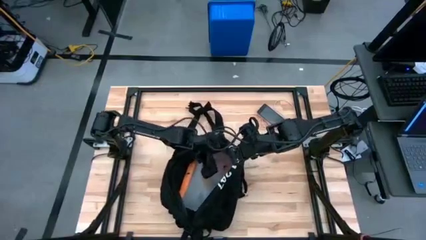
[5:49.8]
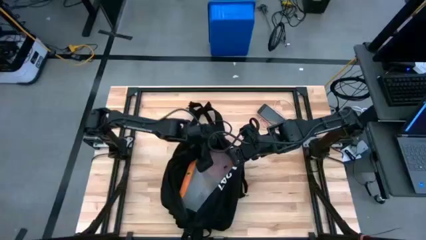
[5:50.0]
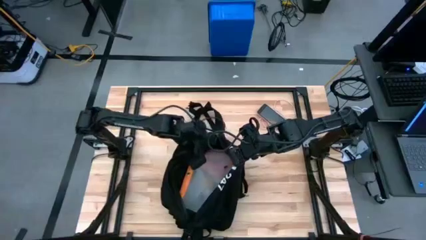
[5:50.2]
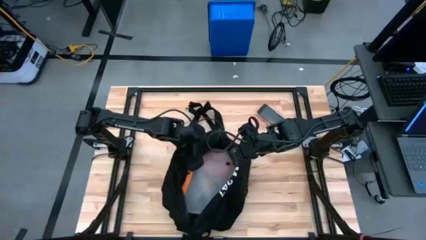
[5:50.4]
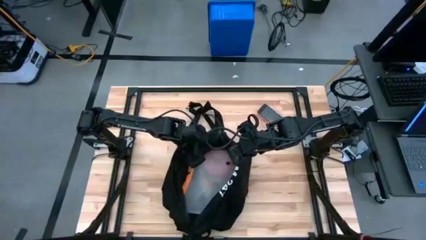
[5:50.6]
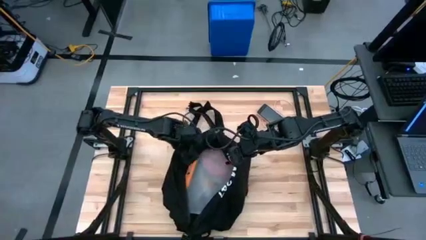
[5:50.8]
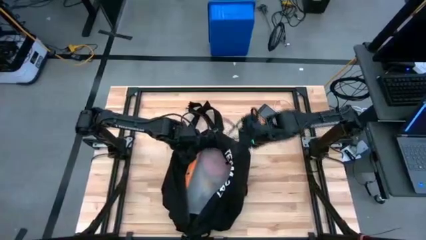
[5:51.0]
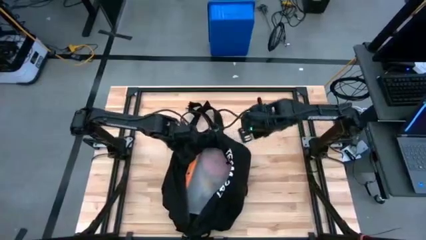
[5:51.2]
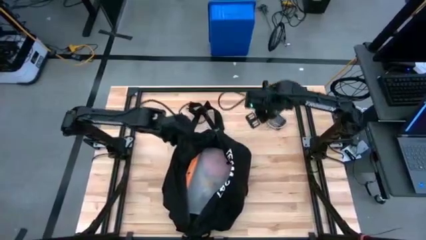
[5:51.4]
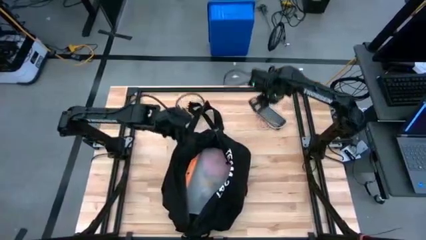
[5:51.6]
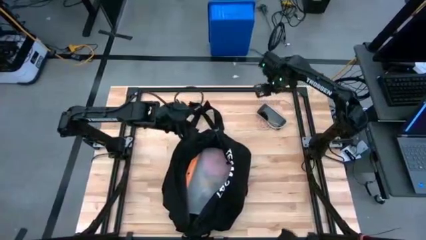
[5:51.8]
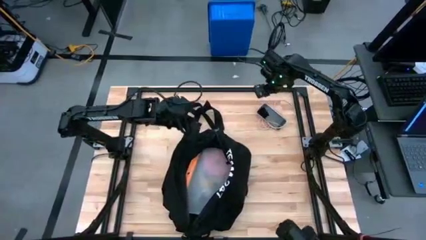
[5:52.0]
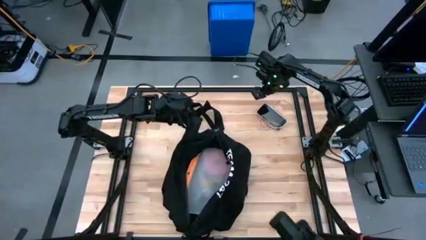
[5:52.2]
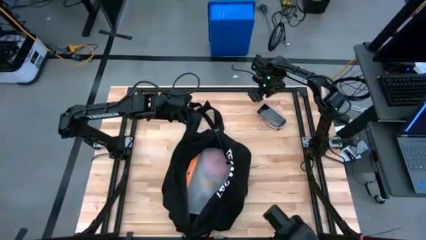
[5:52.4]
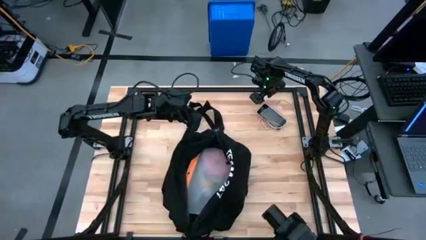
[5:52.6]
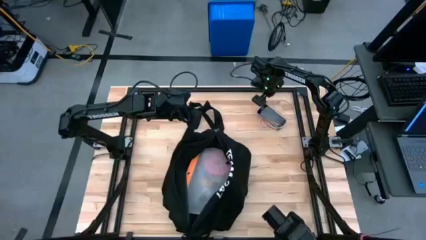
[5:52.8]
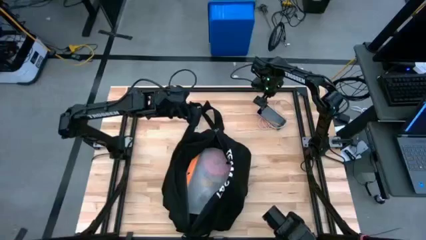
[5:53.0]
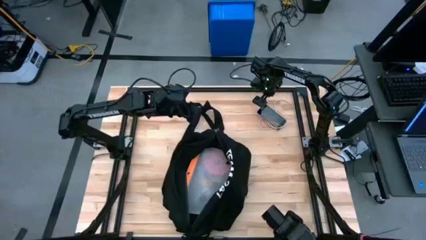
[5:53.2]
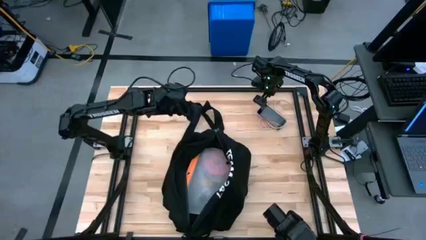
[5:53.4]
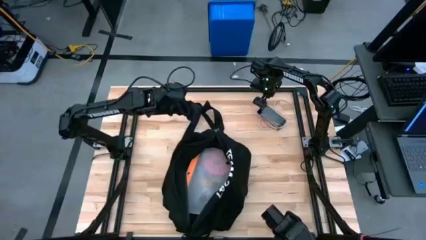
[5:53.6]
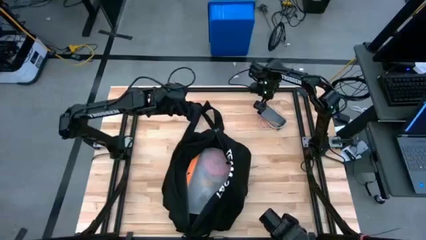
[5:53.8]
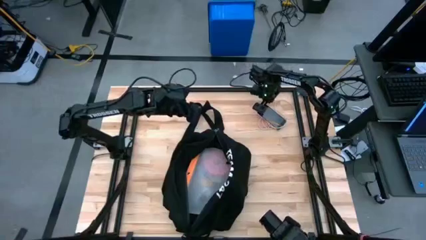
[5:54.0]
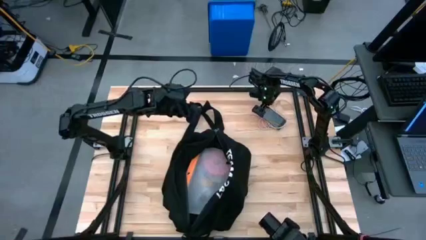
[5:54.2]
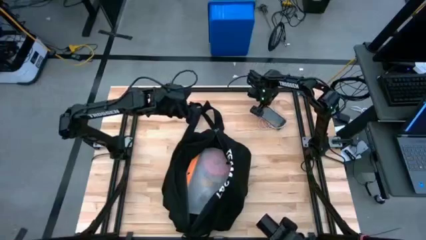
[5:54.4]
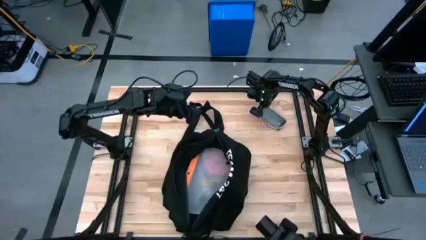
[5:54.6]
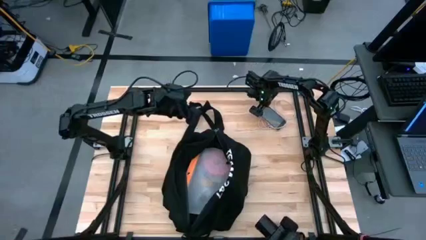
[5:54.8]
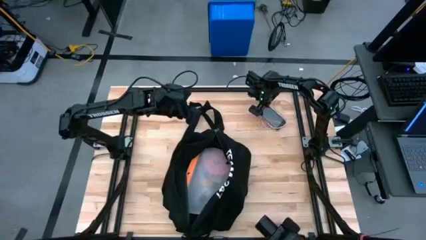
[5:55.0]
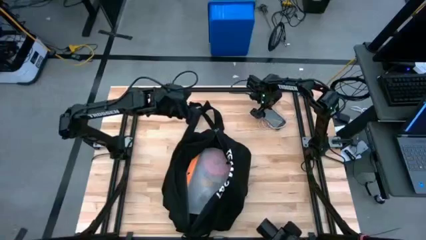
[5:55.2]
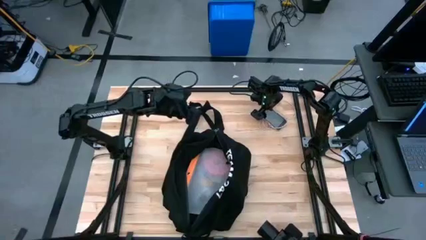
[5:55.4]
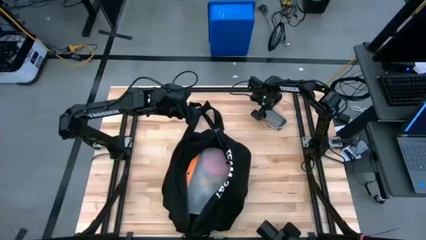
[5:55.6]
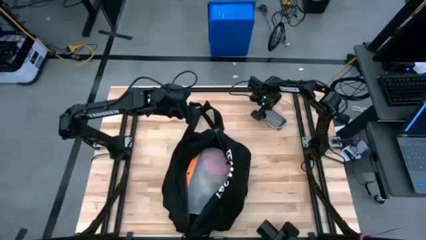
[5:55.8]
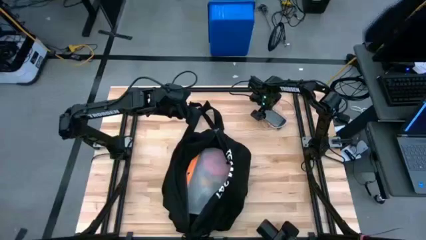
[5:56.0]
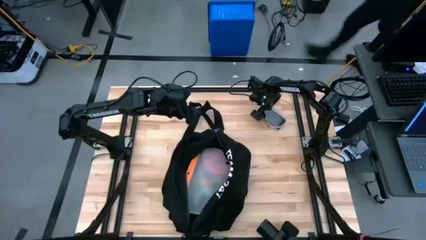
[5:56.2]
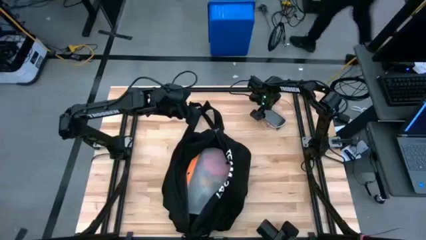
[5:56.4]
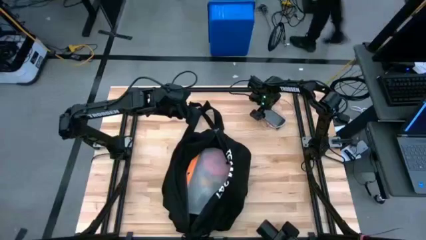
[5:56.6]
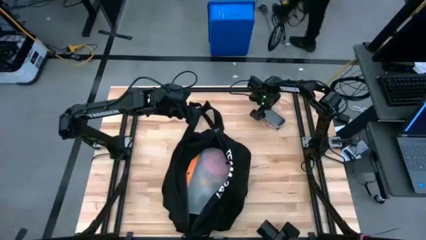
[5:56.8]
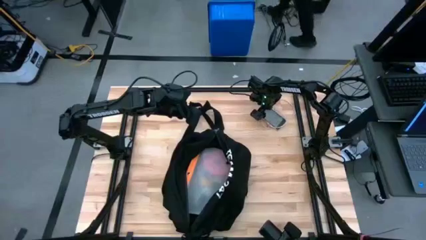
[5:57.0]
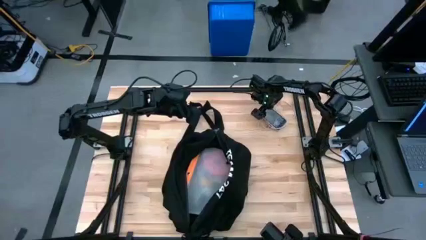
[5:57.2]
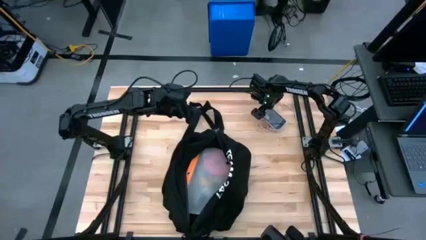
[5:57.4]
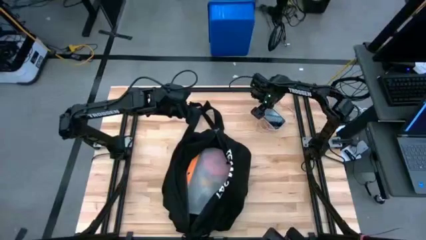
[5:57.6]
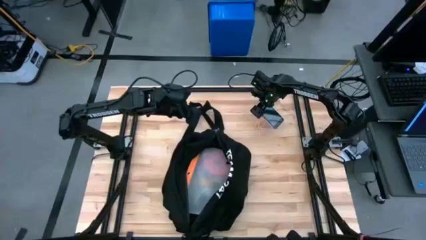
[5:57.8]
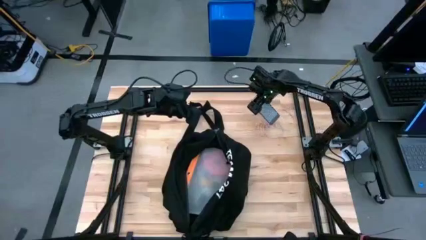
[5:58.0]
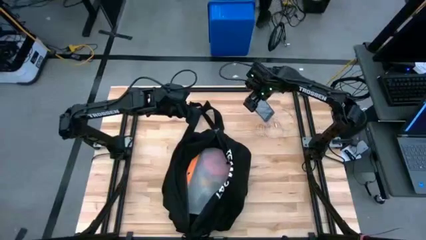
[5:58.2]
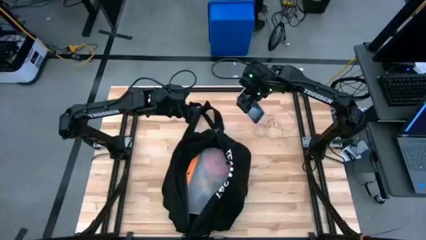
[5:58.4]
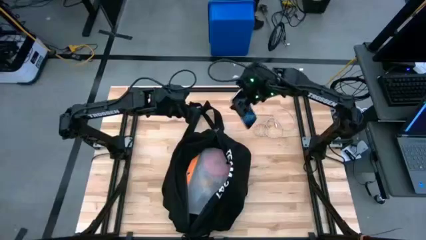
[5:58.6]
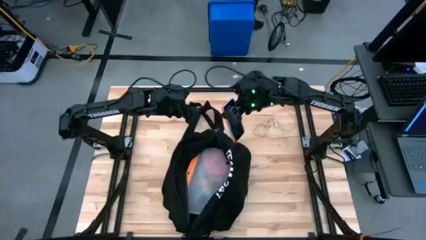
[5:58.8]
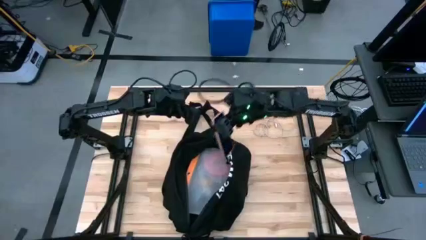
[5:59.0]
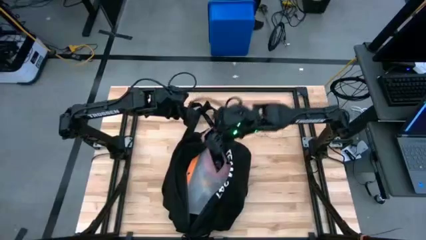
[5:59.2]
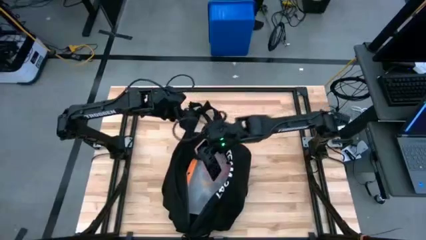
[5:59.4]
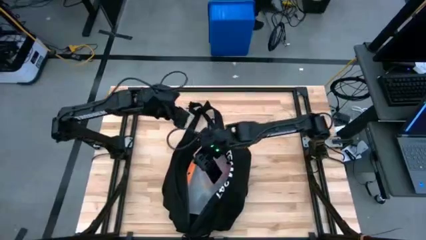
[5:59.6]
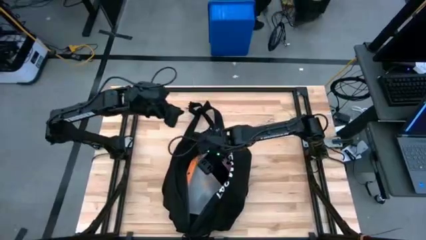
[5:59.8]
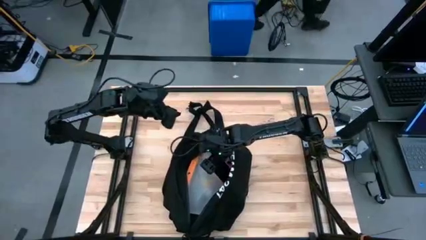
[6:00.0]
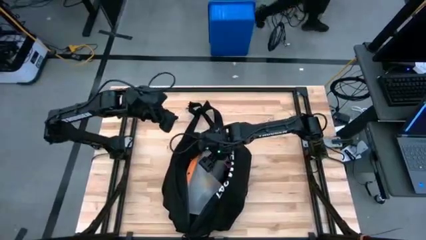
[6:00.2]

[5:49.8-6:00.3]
Task: Unpack backpack
Put the pink cellphone into the black backpack

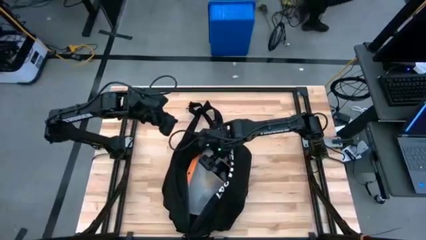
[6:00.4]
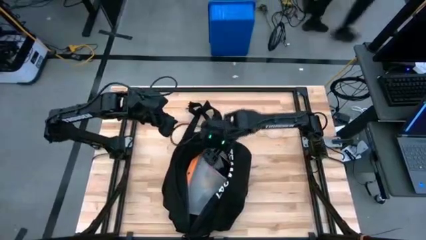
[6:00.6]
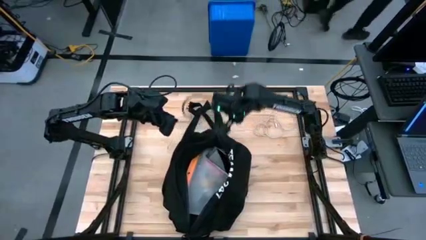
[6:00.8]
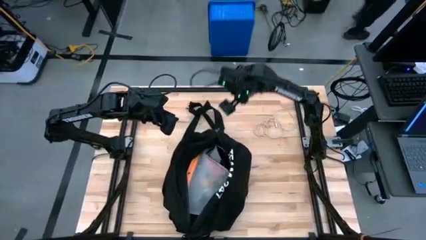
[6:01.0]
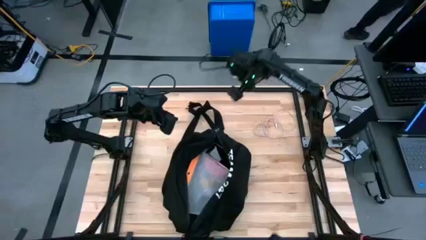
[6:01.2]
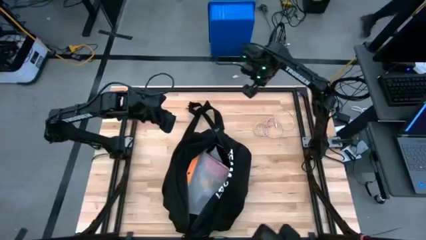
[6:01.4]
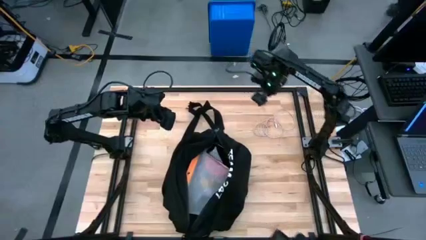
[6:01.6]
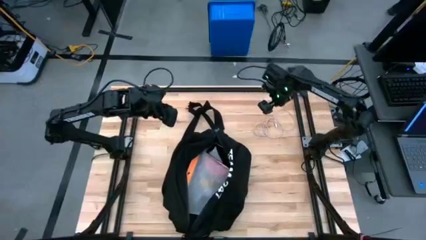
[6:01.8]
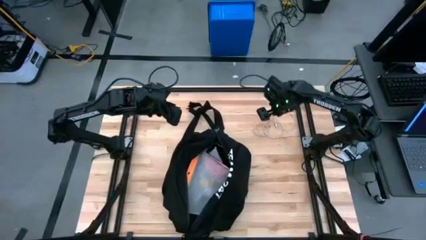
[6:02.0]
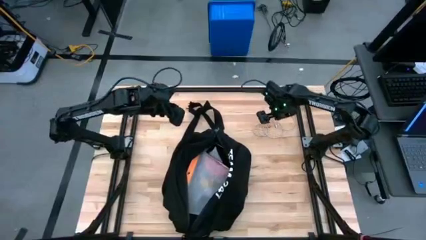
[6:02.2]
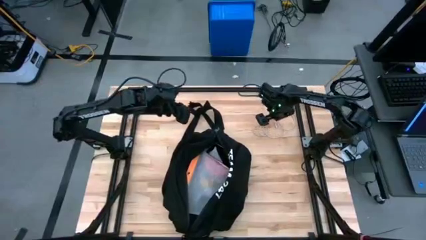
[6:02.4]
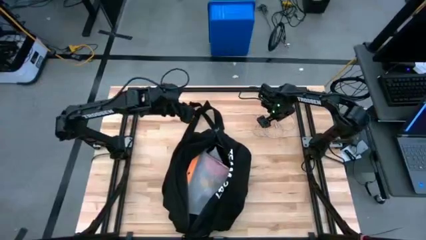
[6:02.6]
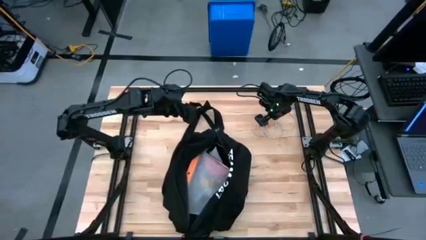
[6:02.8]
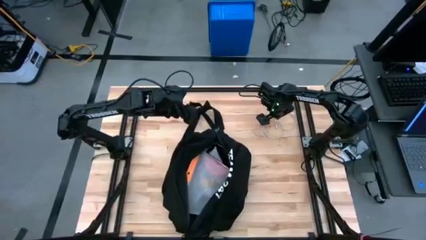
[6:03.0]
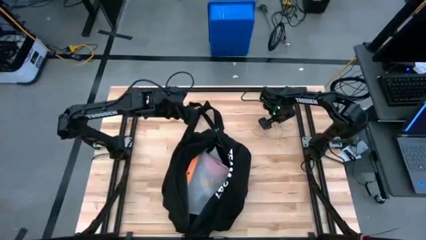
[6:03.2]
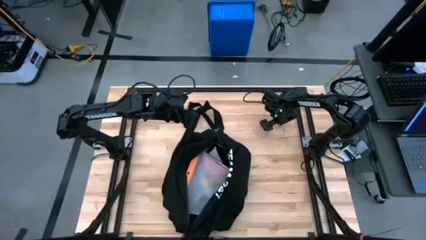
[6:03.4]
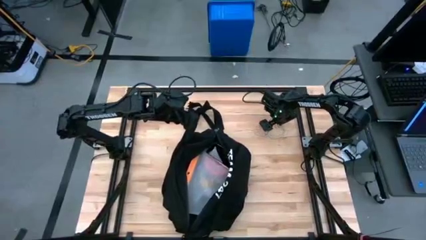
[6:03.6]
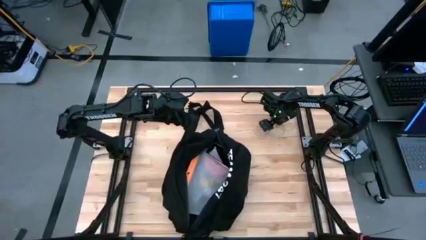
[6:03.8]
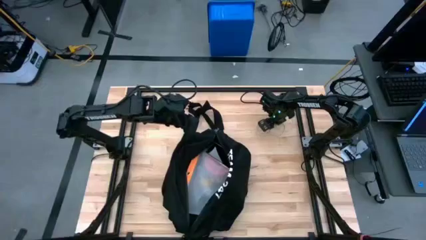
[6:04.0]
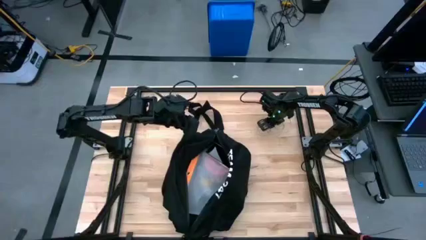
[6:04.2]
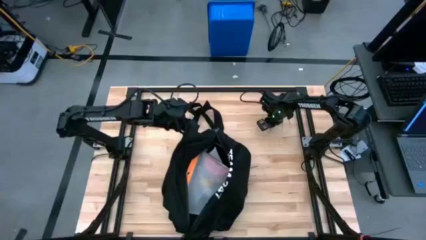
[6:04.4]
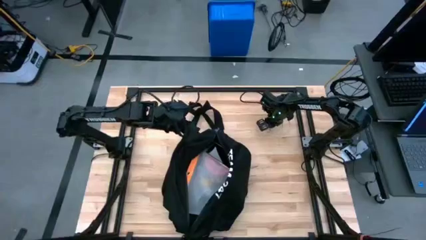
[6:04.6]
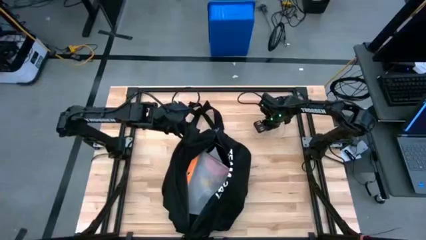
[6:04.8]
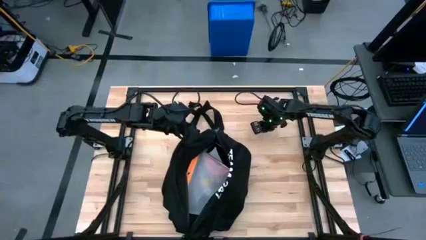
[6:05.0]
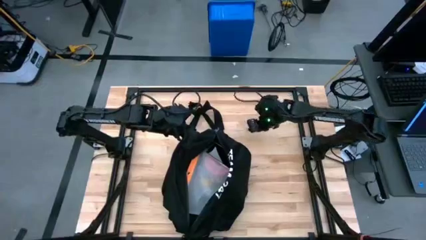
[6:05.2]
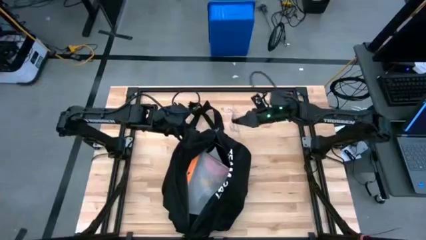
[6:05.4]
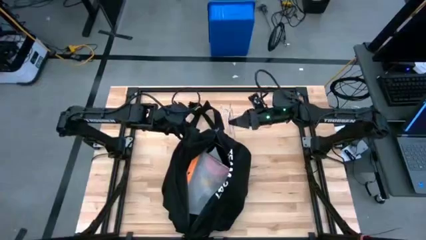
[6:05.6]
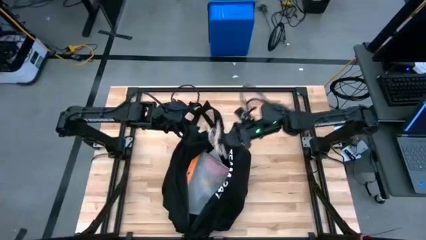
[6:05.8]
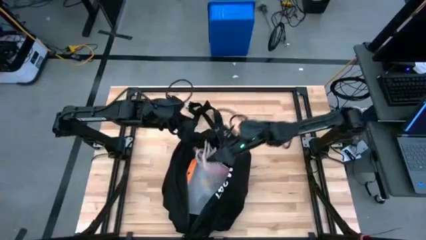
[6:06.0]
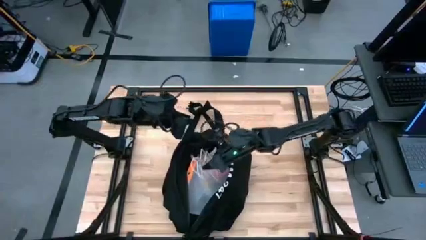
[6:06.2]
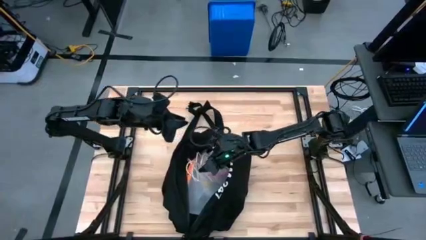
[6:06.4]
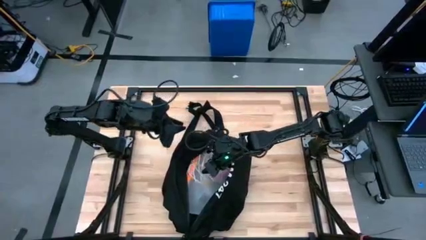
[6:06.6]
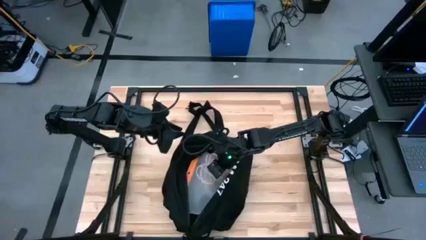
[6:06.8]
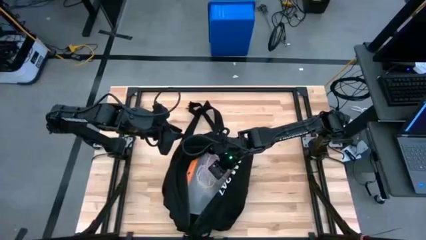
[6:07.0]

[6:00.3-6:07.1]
Put the pink charger cable into the black backpack
